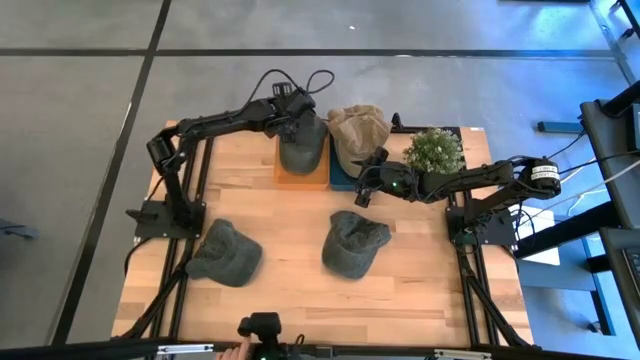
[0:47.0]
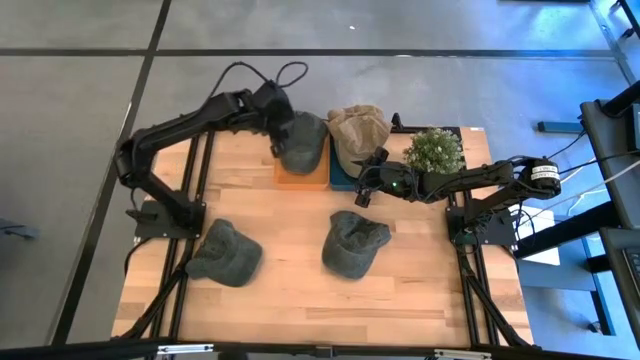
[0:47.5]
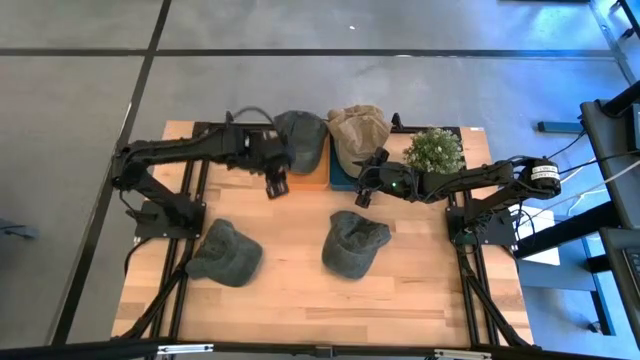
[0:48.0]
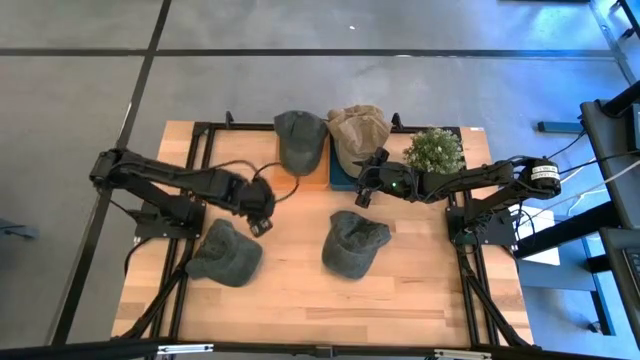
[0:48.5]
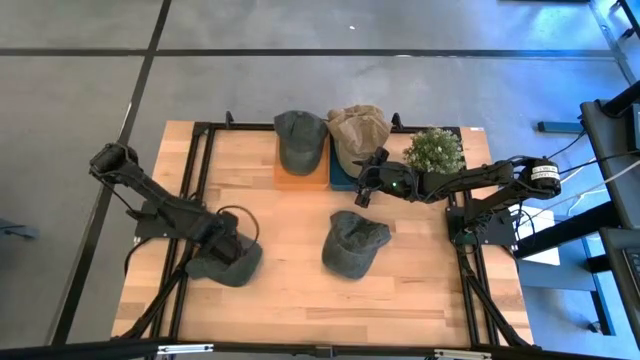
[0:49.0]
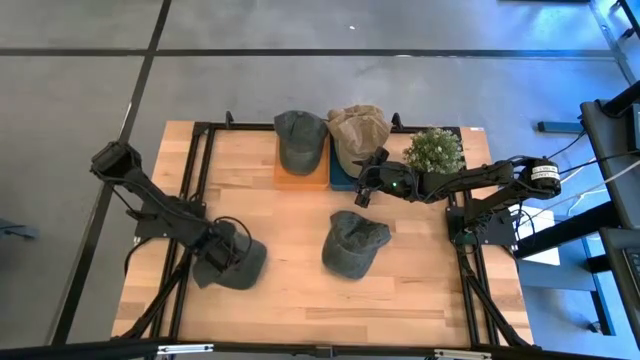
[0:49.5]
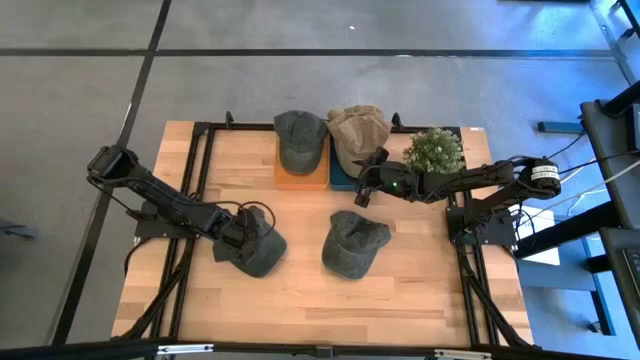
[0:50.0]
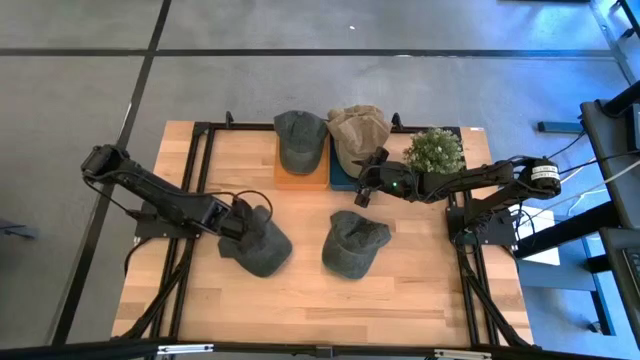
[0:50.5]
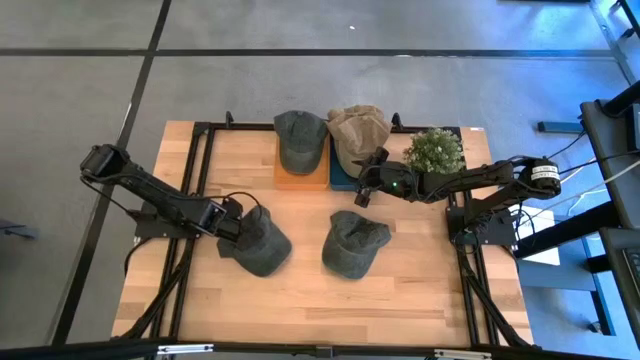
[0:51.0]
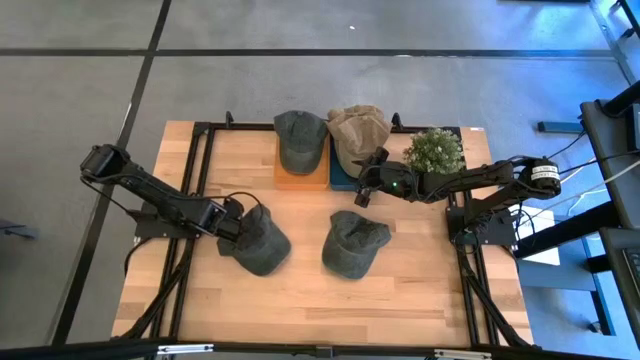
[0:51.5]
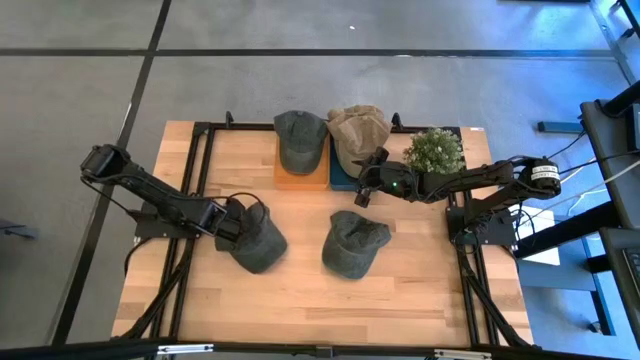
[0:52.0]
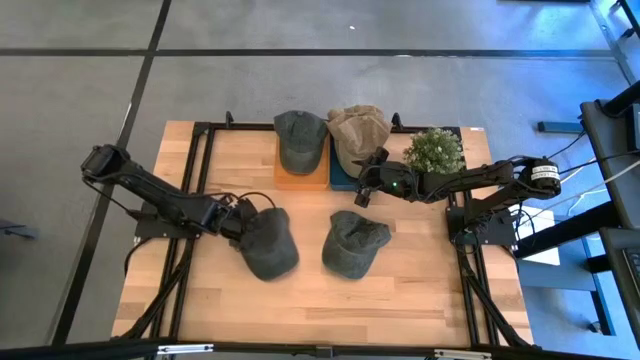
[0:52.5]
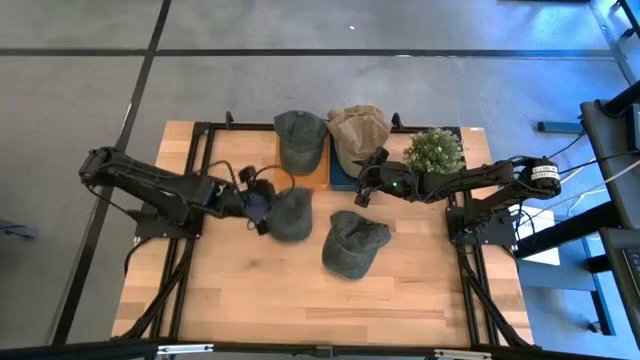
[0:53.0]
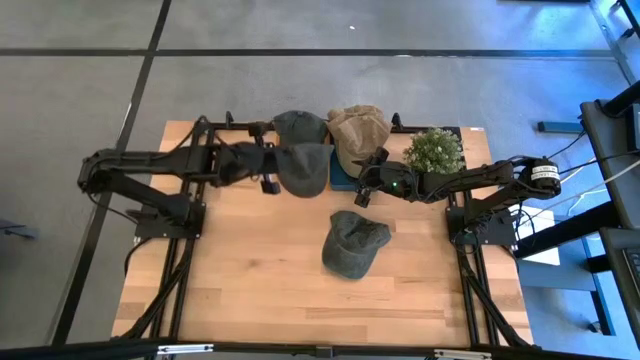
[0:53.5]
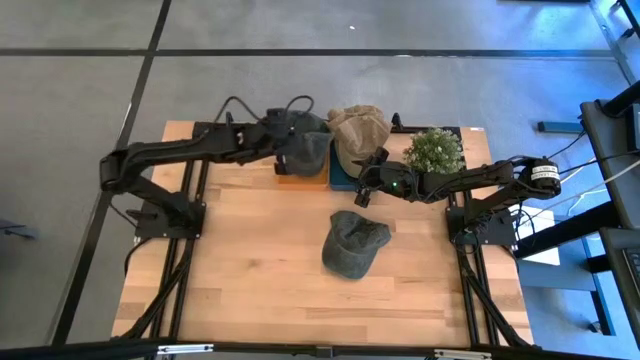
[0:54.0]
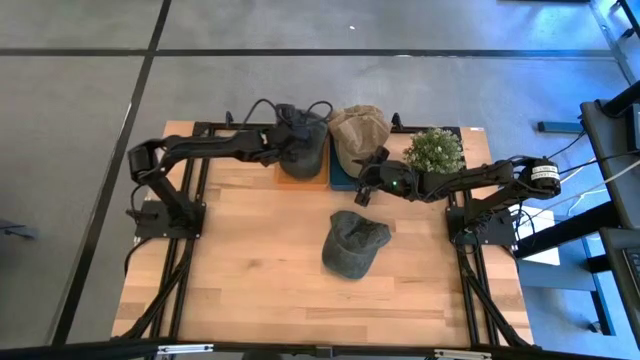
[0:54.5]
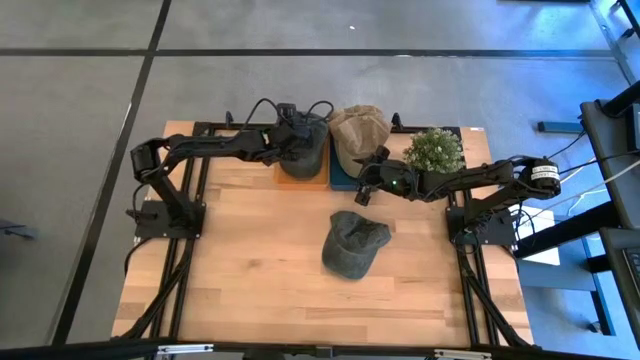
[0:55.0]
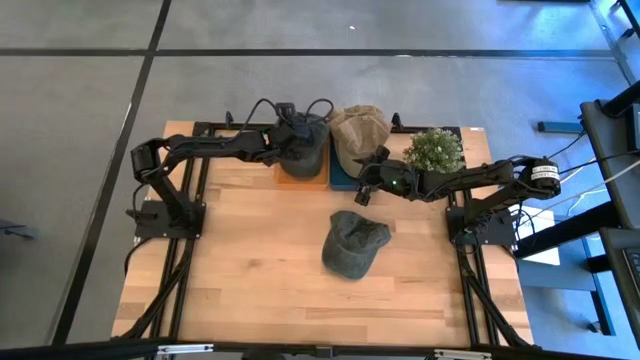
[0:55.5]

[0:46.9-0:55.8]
Task: Pick & Place hat
Put the left black cap into the left transparent bin

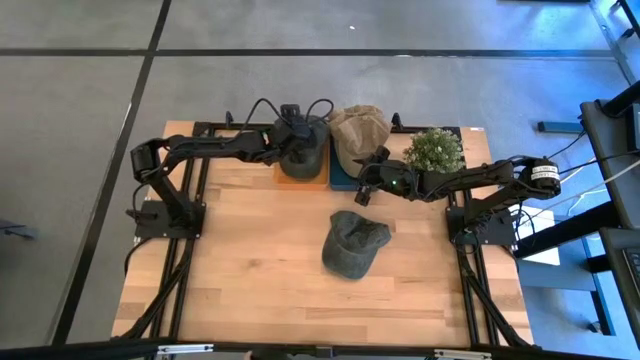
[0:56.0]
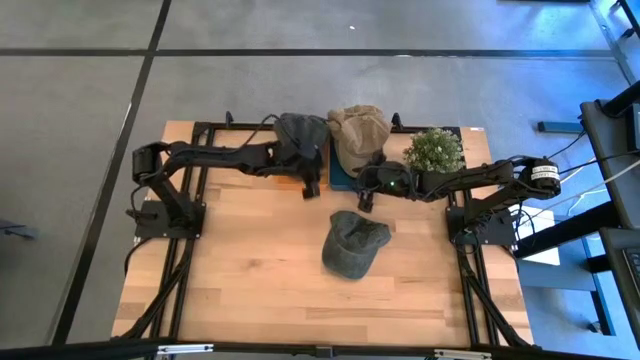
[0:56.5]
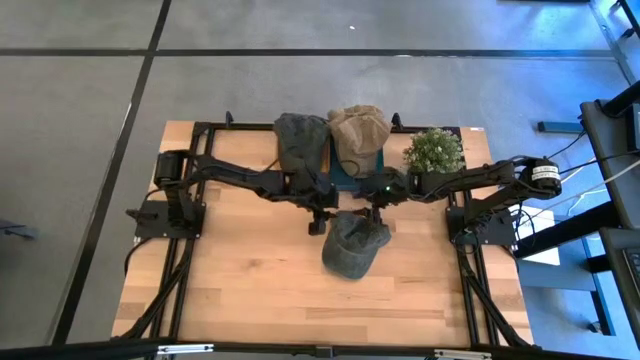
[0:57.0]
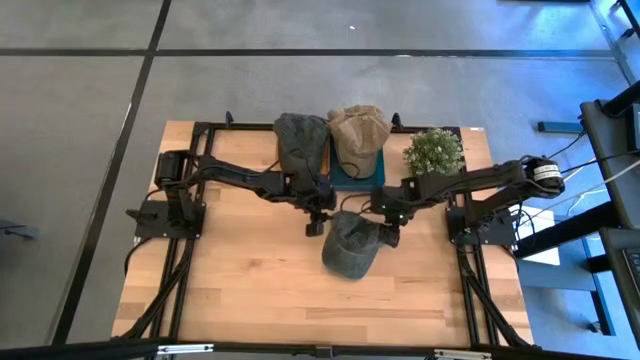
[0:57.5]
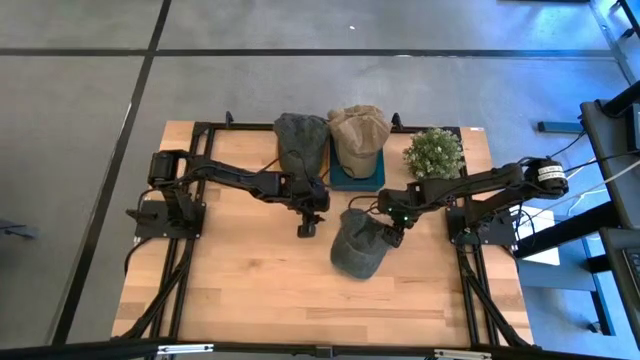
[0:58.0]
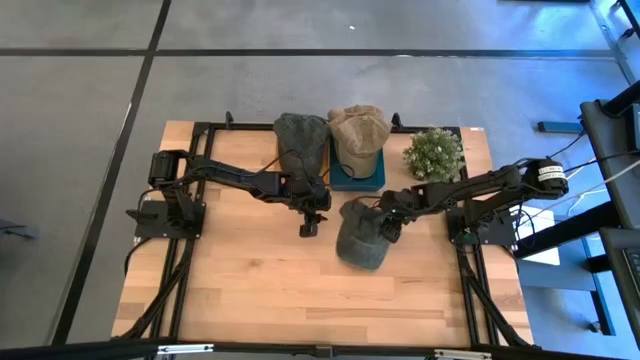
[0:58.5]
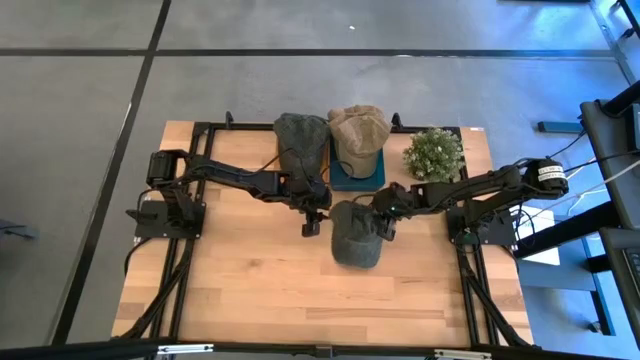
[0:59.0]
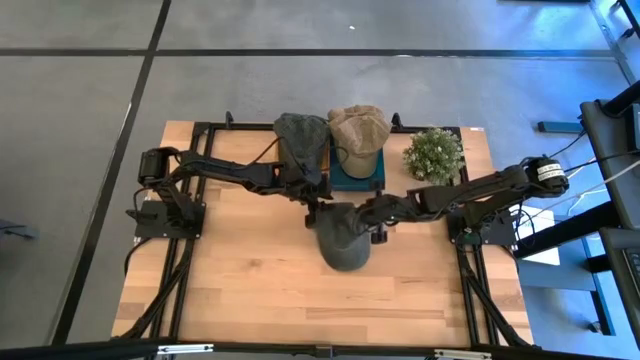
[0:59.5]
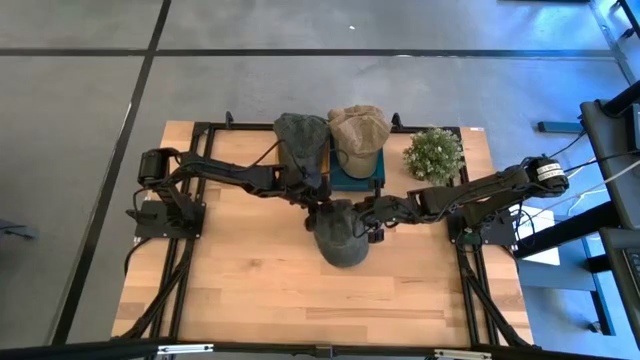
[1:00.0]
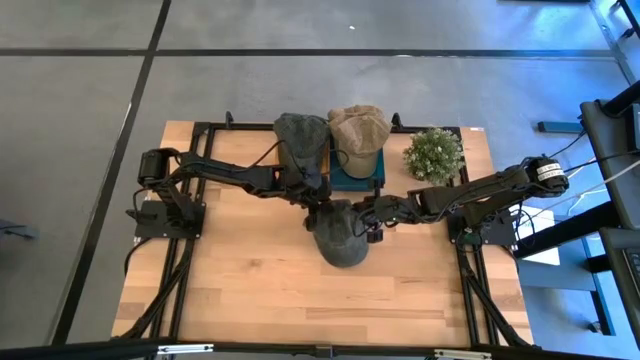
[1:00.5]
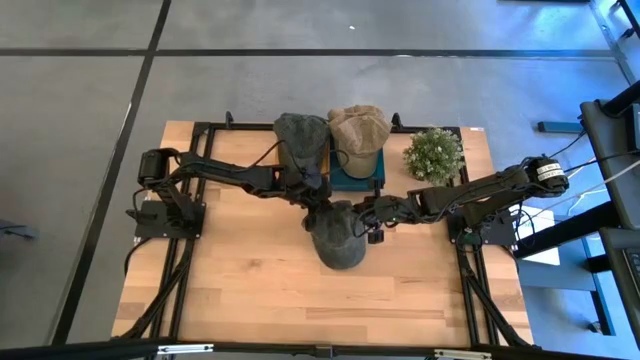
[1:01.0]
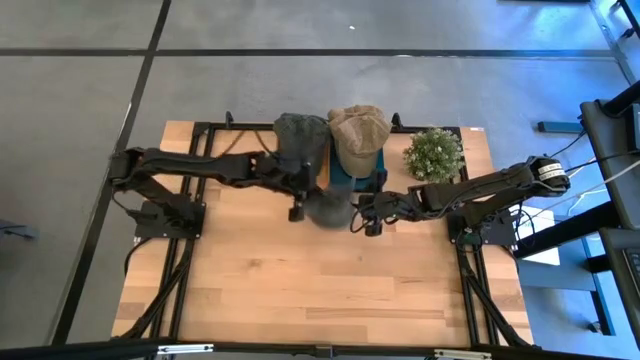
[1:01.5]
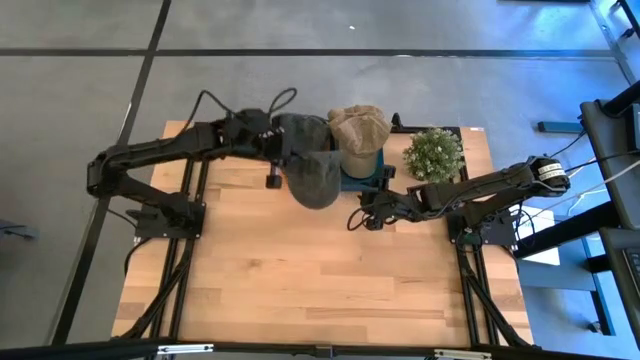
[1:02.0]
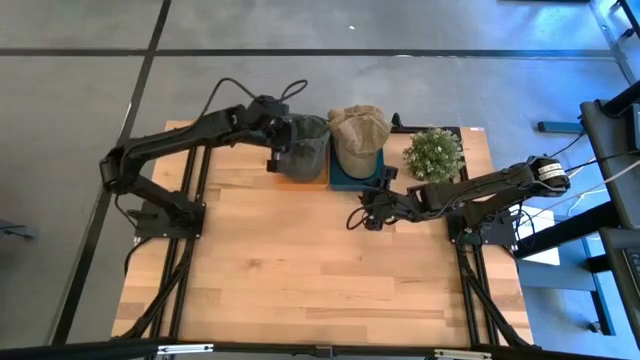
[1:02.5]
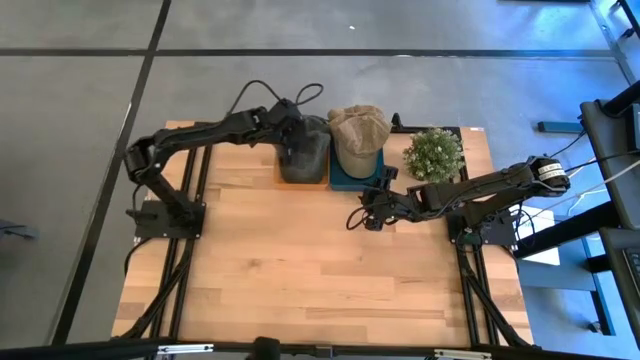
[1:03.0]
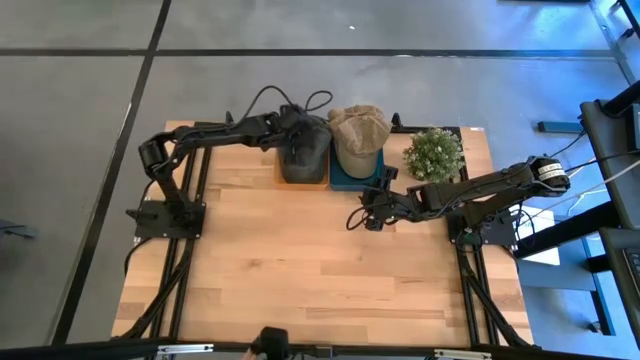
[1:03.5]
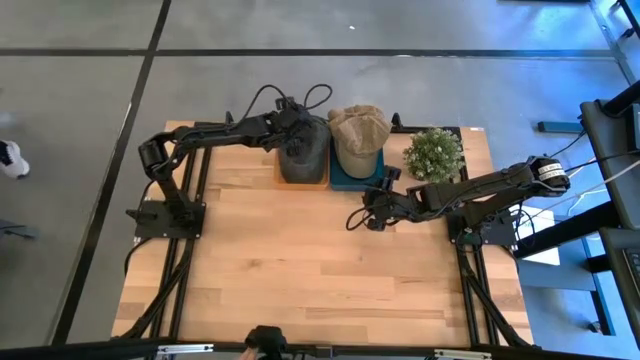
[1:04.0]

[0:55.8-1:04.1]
Put the black cap into the left transparent bin

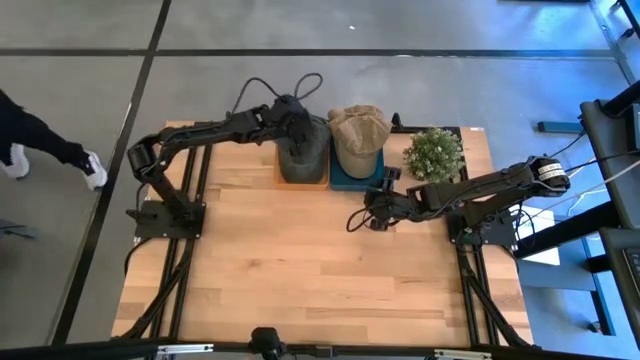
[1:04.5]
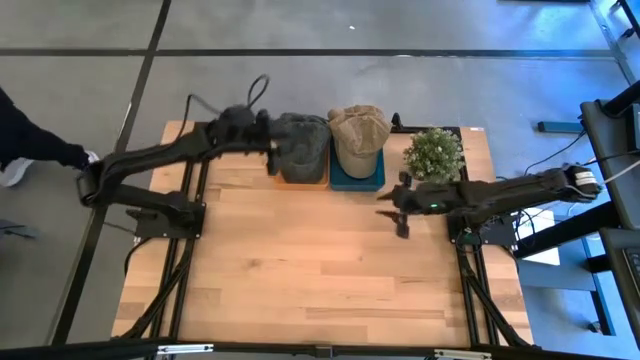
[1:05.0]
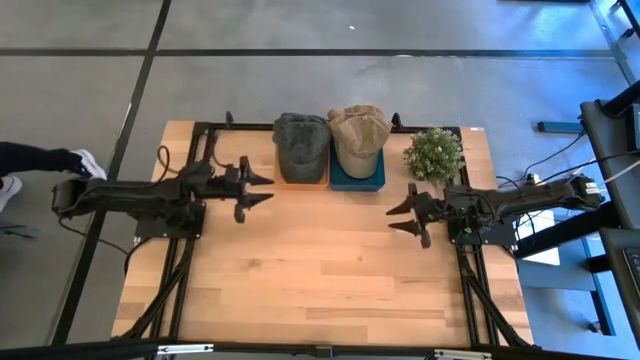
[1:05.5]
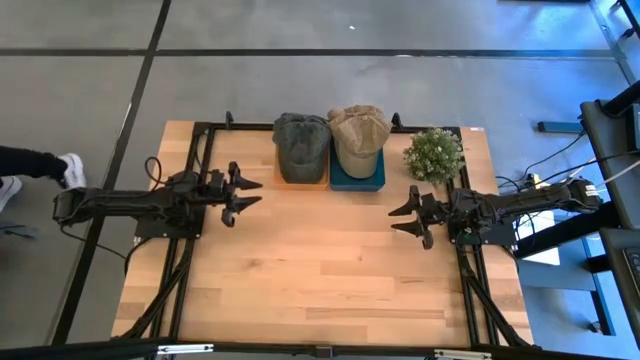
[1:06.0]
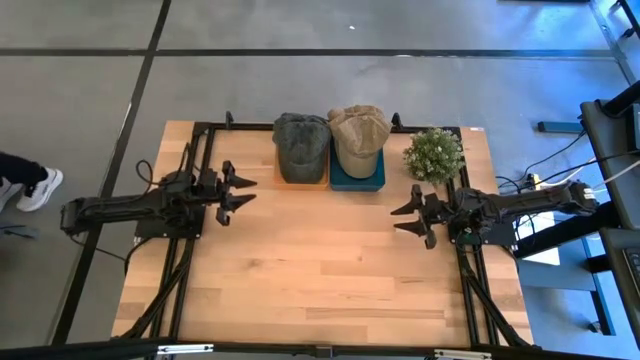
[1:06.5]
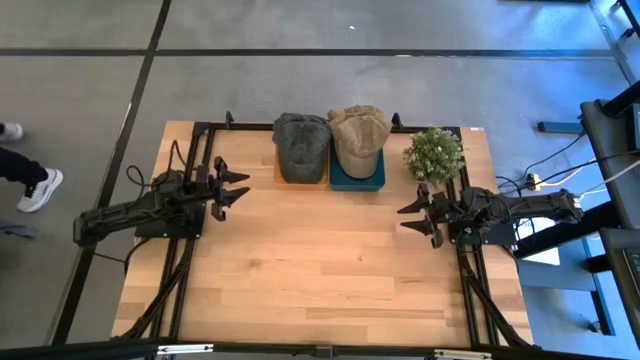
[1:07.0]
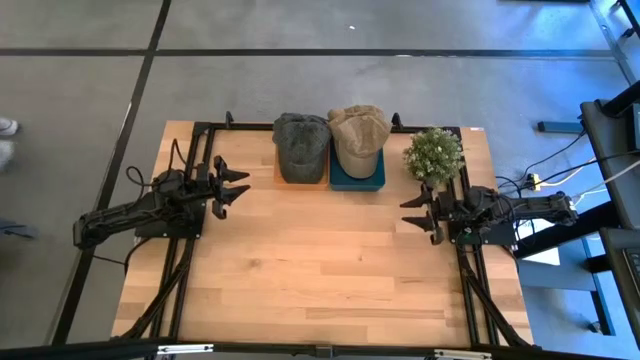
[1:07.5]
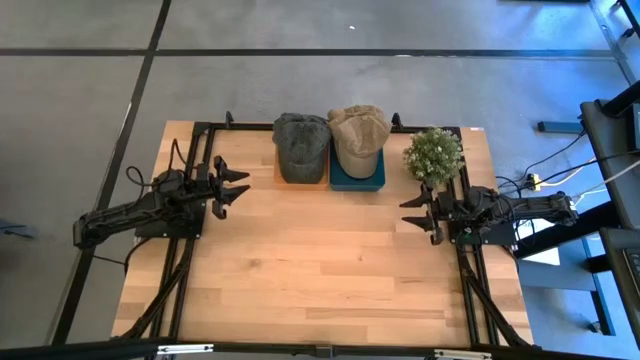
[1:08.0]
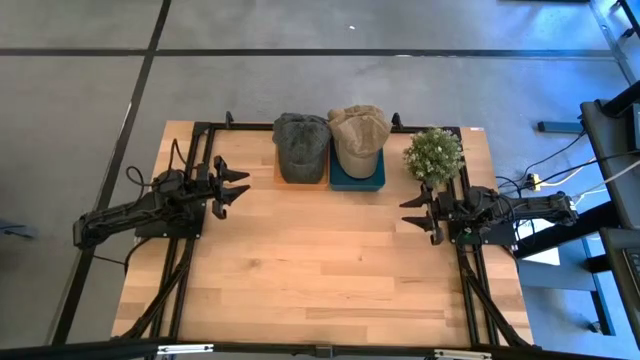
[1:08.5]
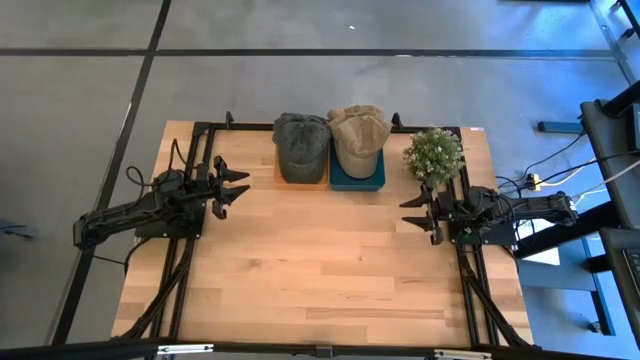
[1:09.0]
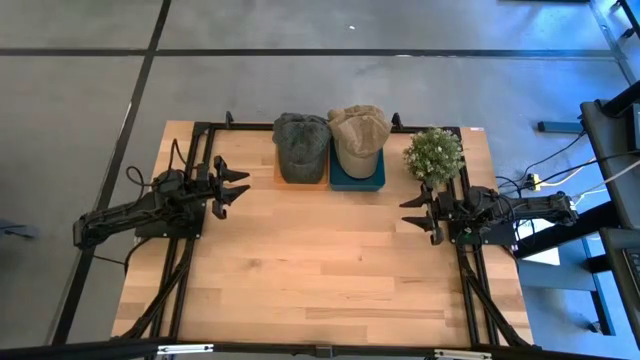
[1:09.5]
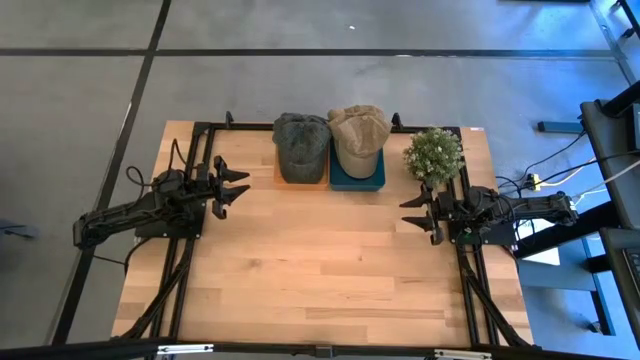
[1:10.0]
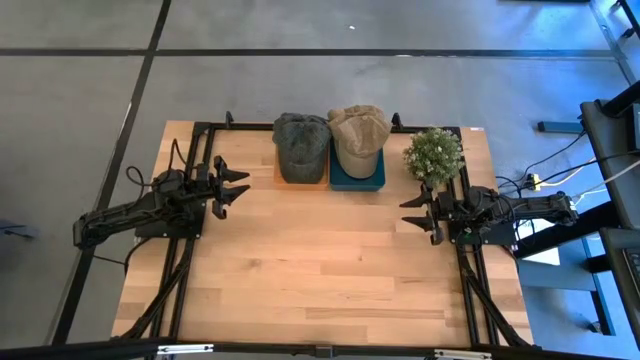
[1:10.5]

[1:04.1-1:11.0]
Return to Home Position
